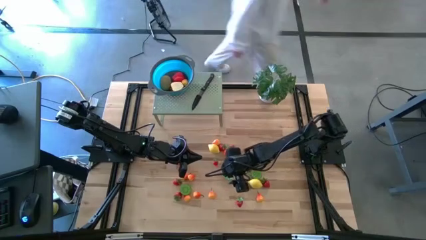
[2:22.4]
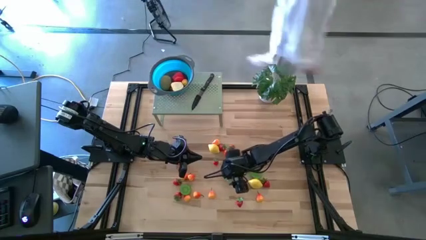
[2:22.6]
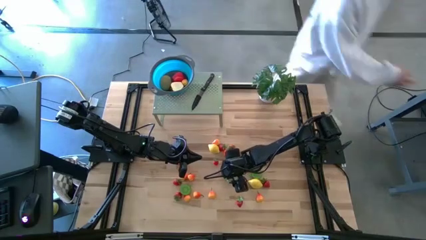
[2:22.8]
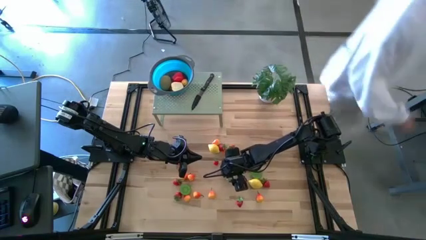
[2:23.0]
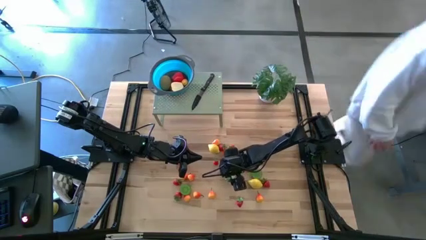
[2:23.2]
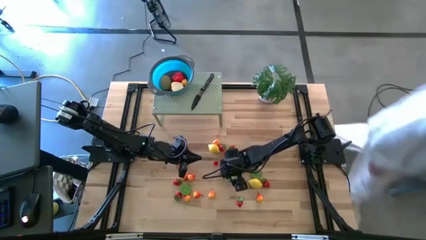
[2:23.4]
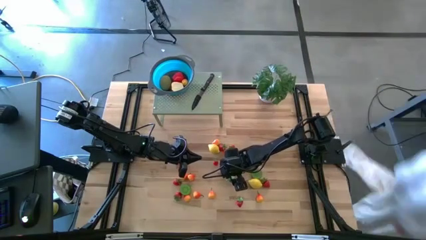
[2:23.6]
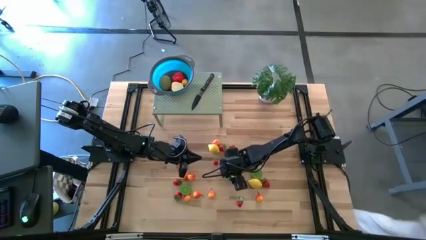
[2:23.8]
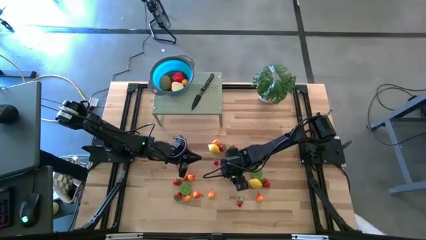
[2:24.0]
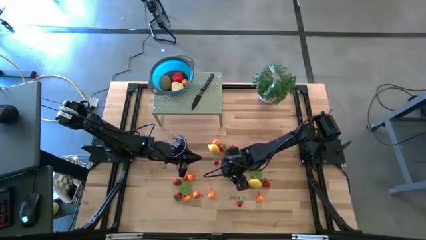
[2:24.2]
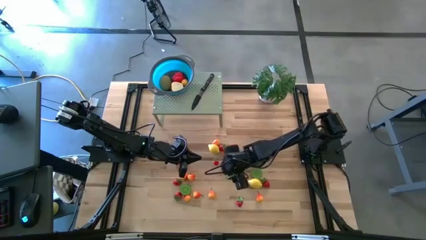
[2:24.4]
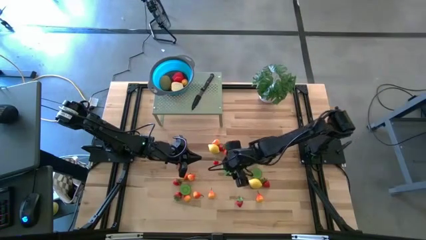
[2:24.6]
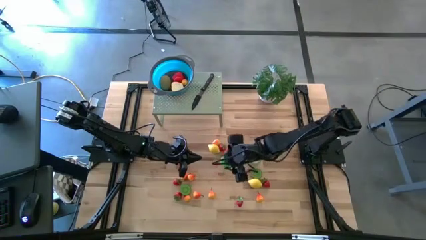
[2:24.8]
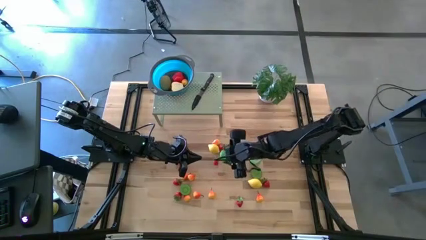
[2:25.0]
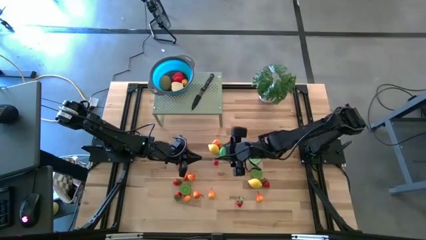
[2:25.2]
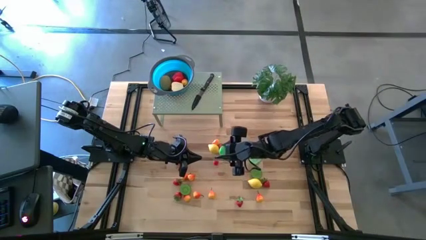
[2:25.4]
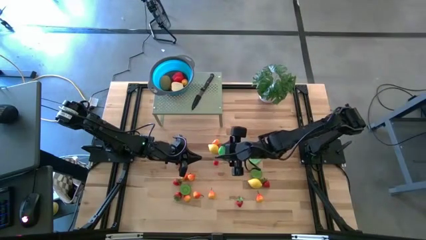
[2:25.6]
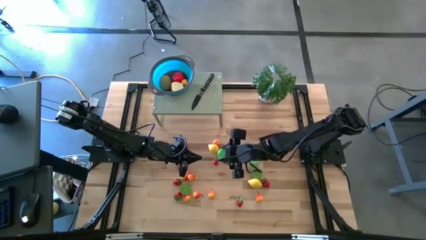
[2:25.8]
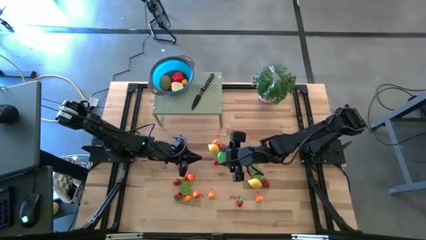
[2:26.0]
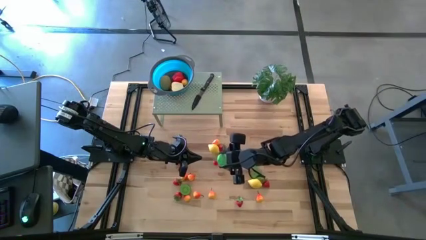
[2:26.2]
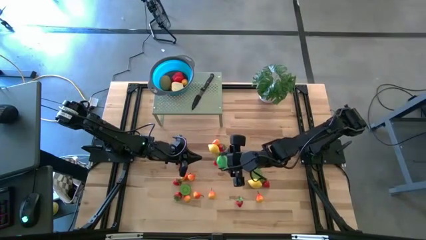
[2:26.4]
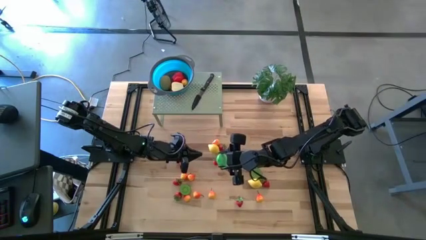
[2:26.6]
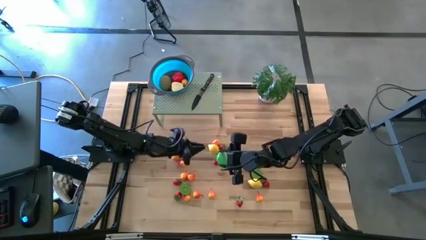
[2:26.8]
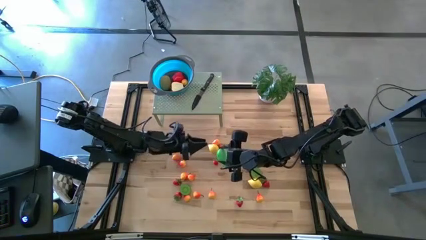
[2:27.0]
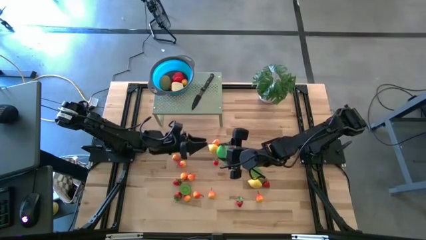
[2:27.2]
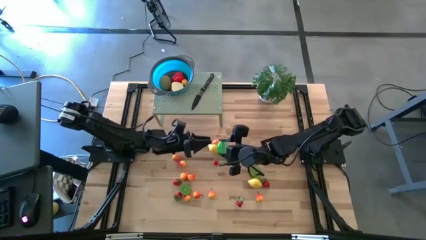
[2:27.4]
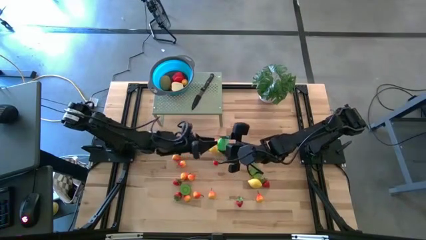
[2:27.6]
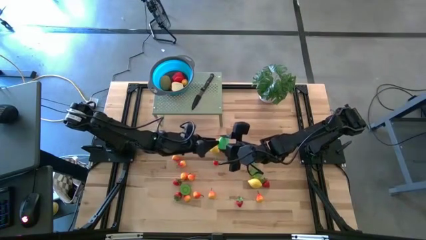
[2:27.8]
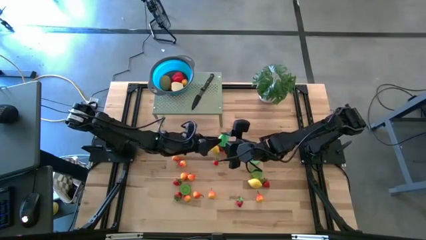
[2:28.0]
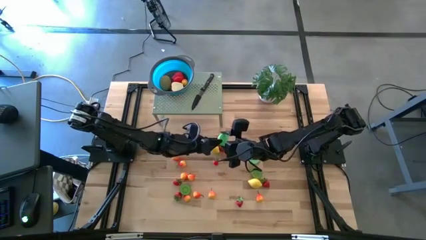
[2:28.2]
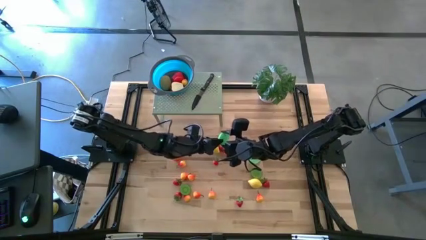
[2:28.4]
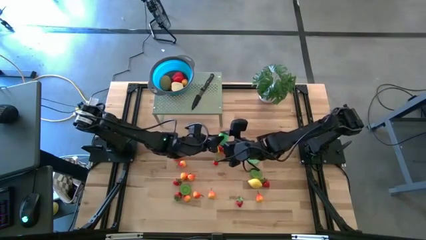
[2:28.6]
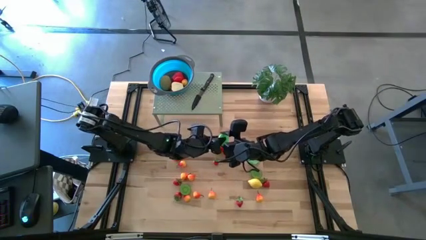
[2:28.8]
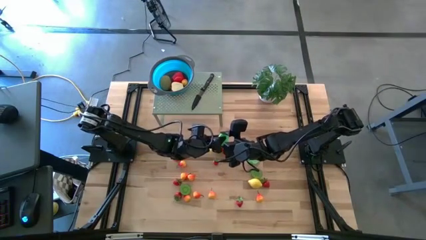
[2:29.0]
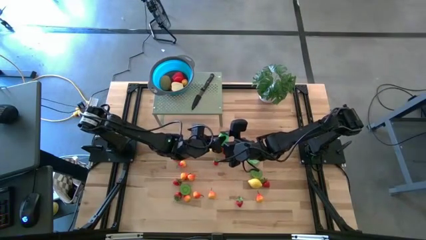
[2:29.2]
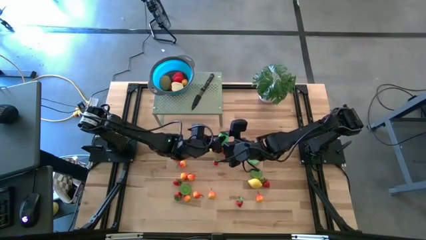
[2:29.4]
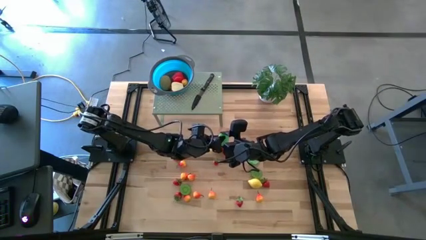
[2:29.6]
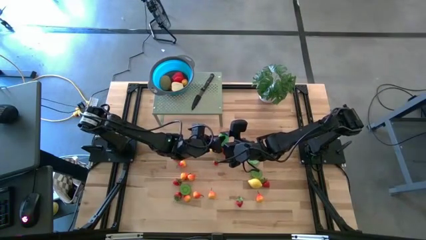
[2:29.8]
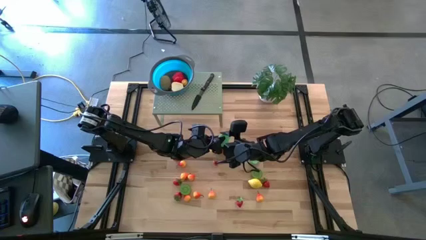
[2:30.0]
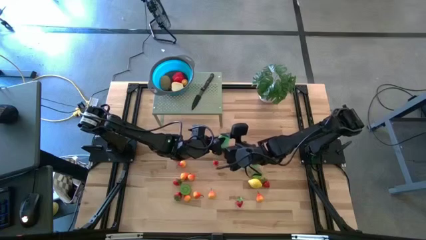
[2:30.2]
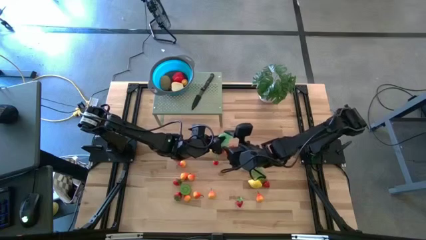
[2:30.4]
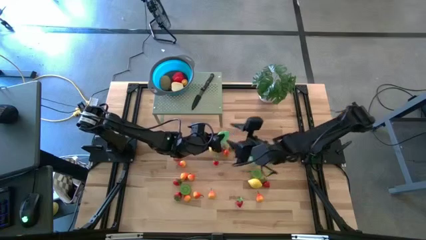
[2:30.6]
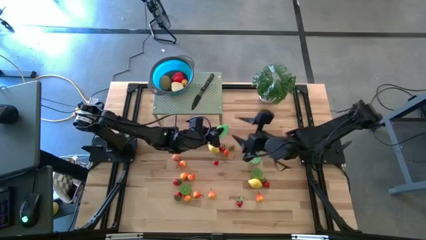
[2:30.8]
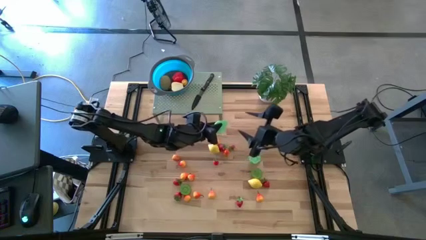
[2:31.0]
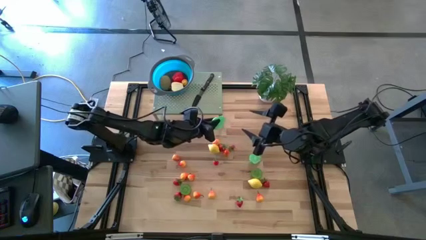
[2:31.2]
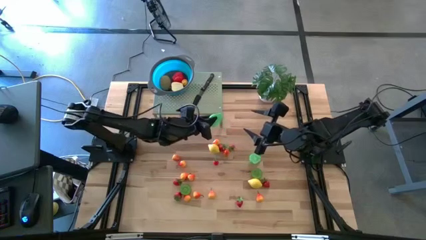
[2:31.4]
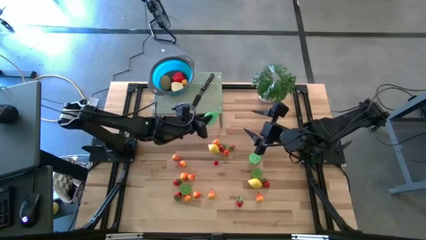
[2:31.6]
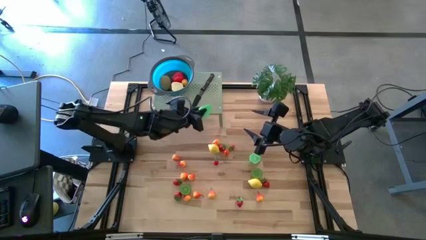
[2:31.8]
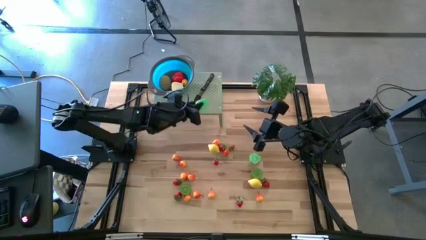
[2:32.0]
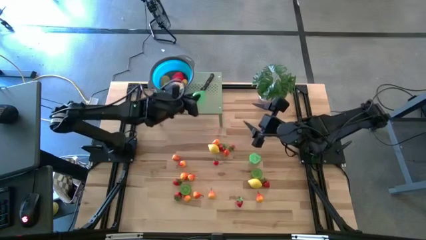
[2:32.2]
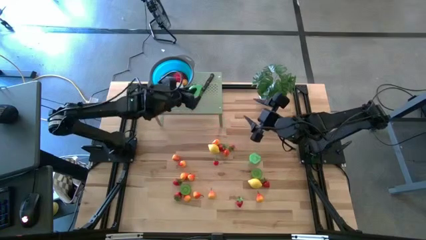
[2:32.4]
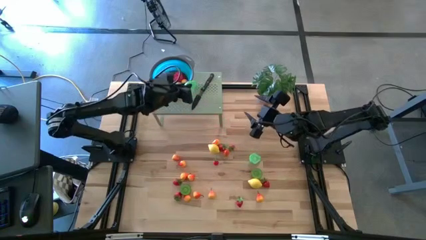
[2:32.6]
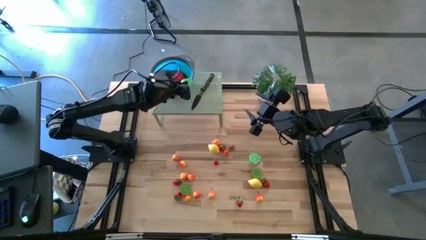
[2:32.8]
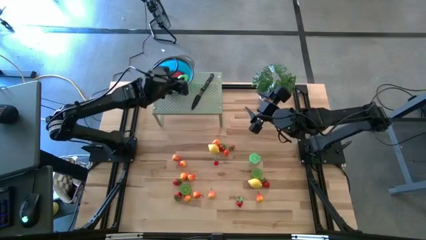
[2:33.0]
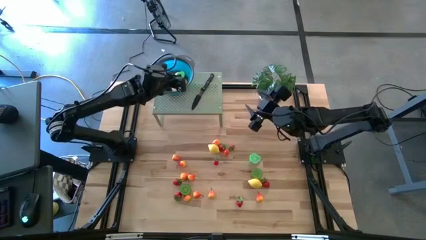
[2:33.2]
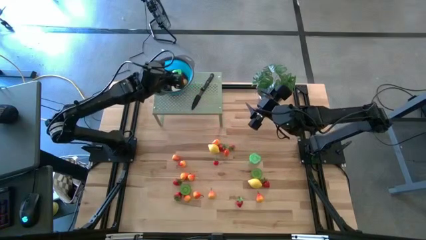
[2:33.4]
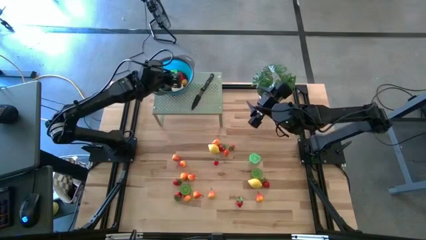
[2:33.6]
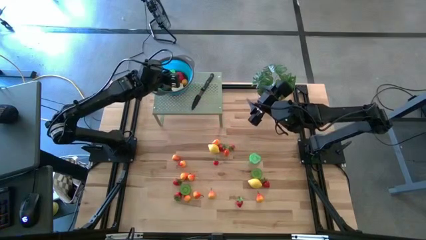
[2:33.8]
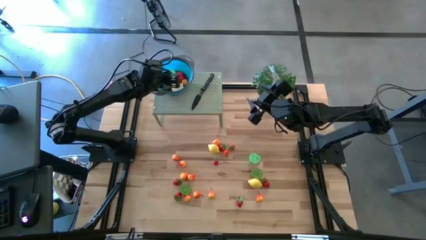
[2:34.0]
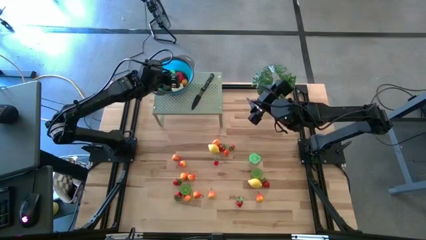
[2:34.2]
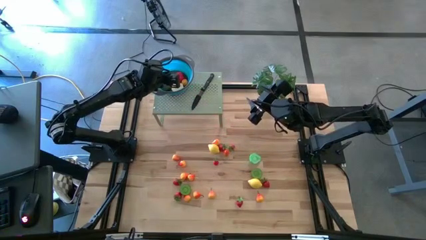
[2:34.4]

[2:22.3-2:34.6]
Task: Pick & Place Fruit
Put the half green pear into the strainer bowl on the shelf

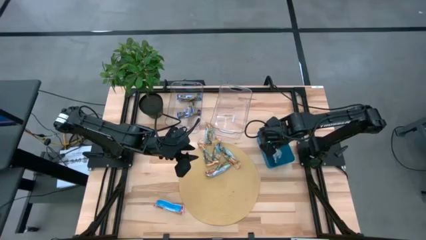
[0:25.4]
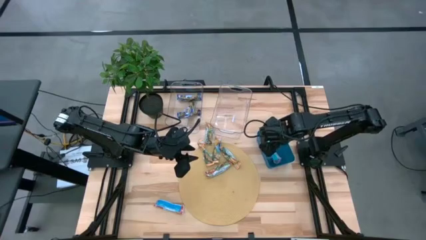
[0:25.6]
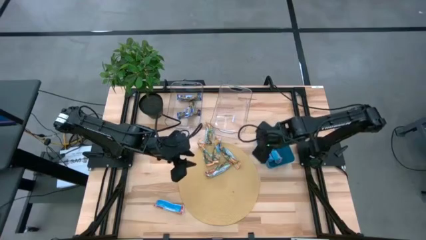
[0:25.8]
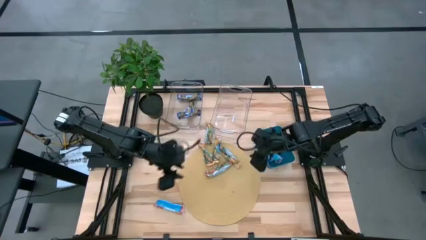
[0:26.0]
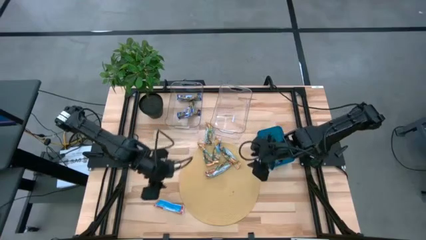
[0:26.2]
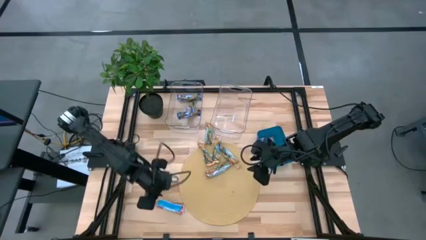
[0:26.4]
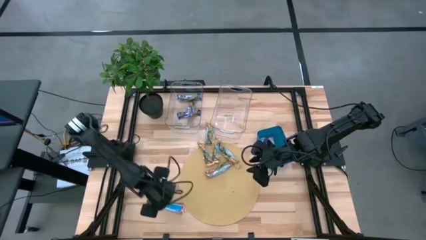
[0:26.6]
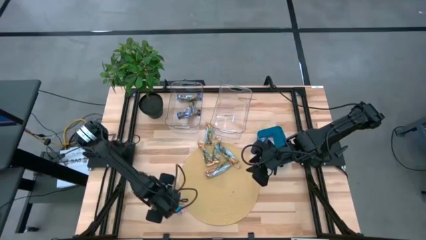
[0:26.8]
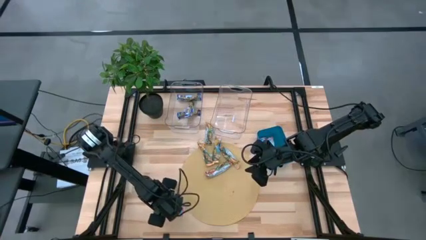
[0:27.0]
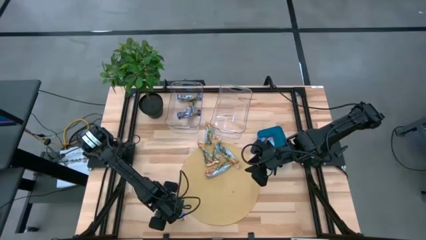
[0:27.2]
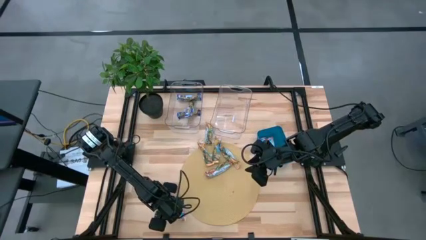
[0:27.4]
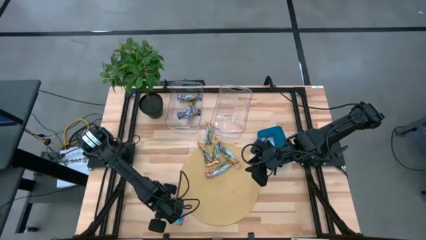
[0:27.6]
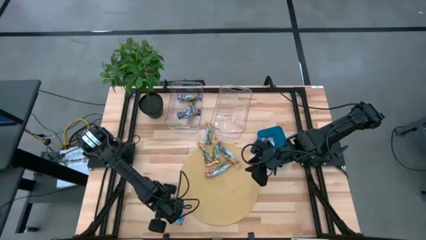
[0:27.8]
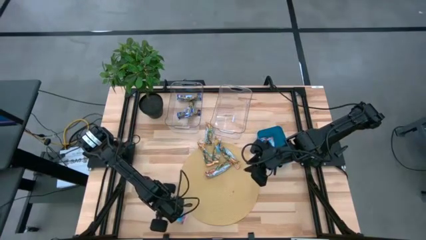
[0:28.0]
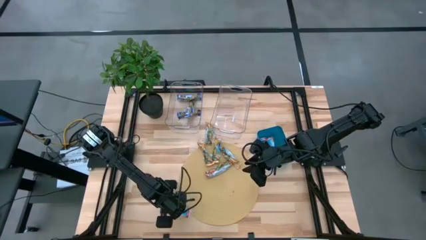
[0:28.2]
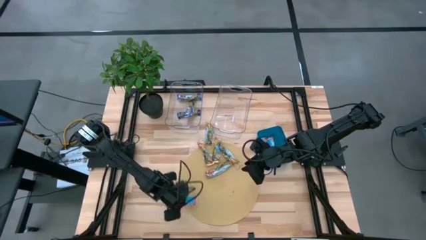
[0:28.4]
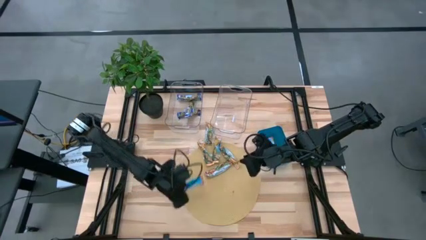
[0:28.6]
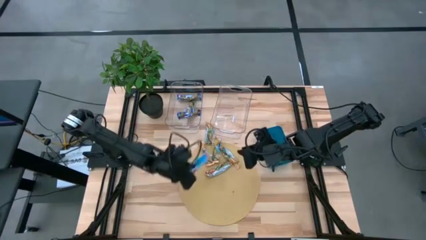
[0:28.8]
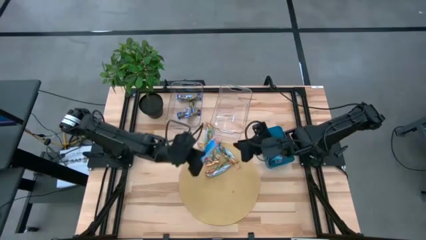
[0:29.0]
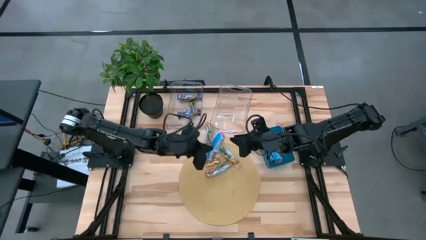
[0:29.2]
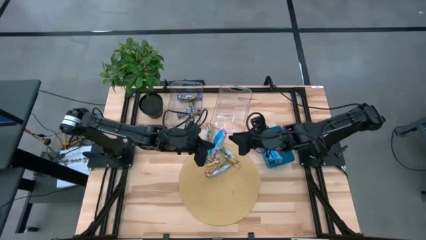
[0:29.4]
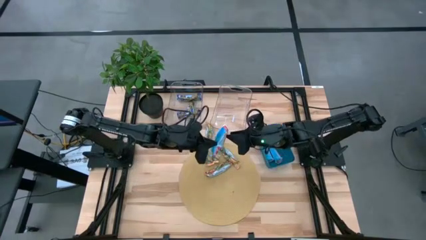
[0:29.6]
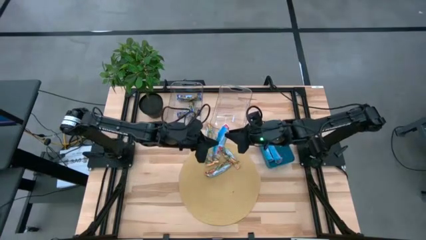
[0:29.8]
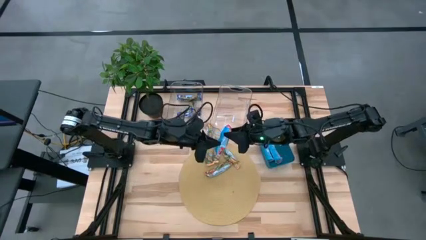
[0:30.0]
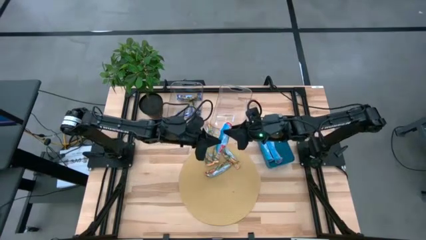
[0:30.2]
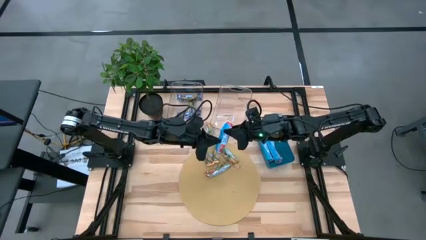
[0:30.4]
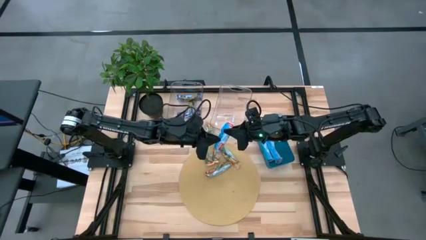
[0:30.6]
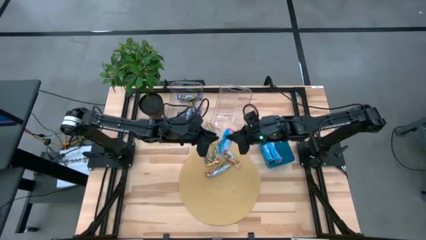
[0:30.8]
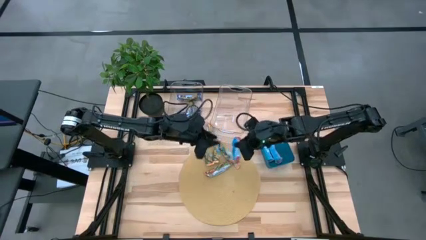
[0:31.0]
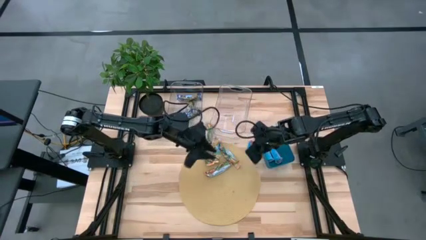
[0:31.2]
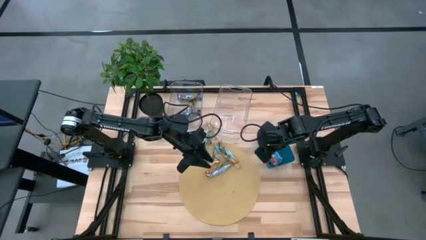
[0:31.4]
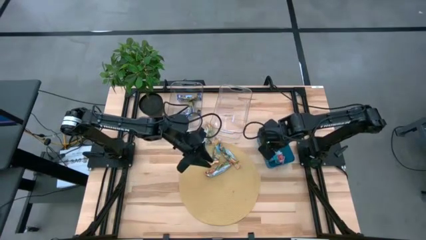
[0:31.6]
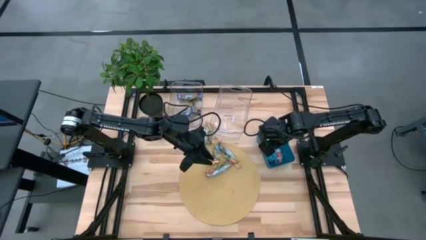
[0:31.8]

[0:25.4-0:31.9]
Task: Pick and place Granola Bars by type
Put the red granola bar into the blue transparent bin
